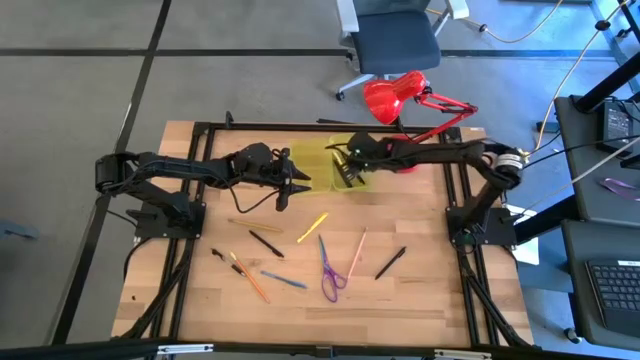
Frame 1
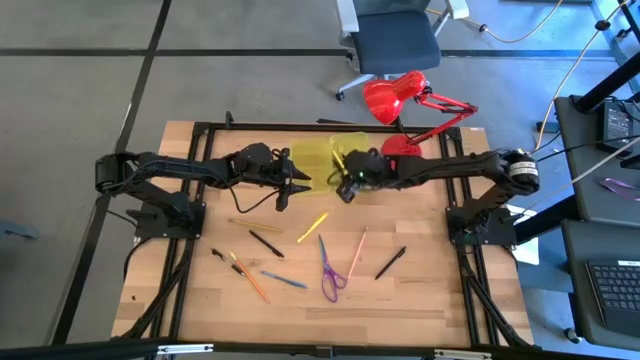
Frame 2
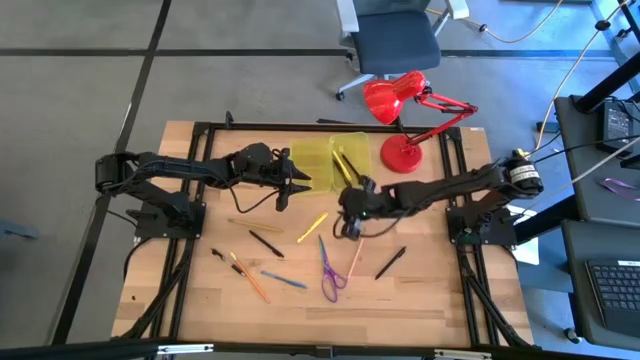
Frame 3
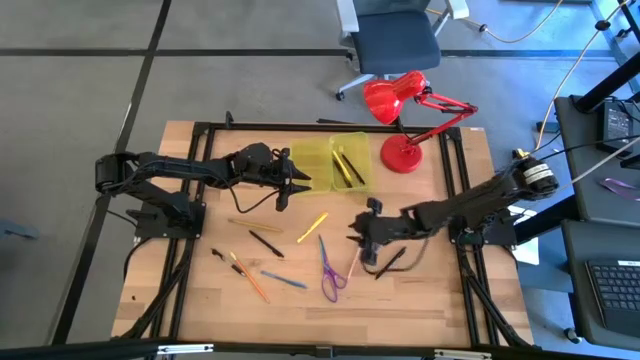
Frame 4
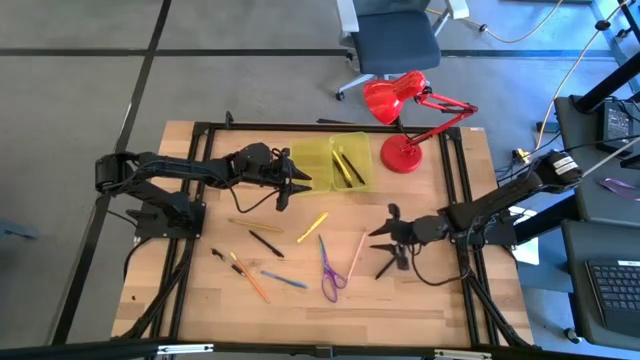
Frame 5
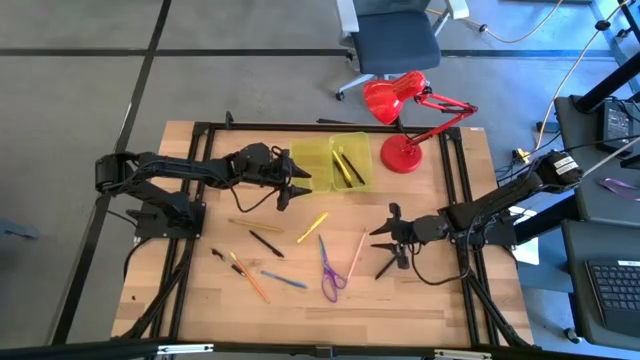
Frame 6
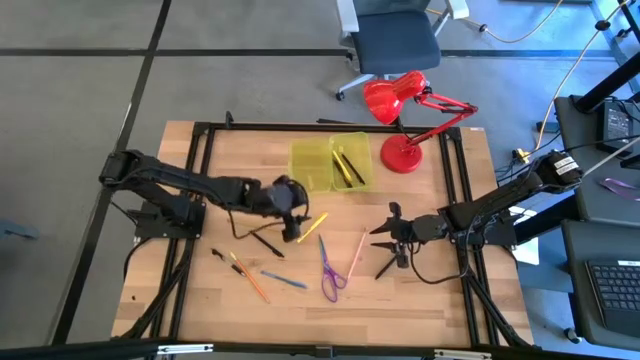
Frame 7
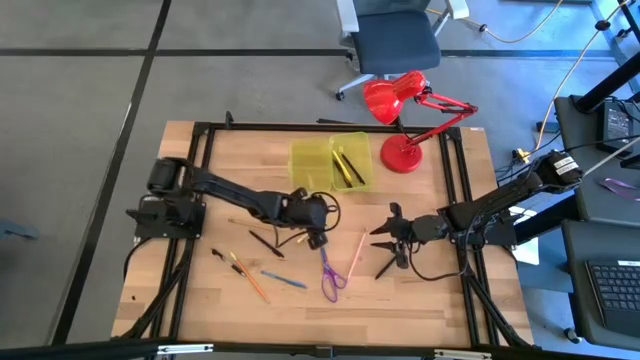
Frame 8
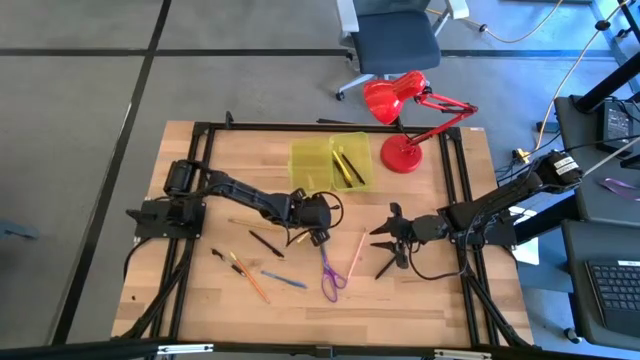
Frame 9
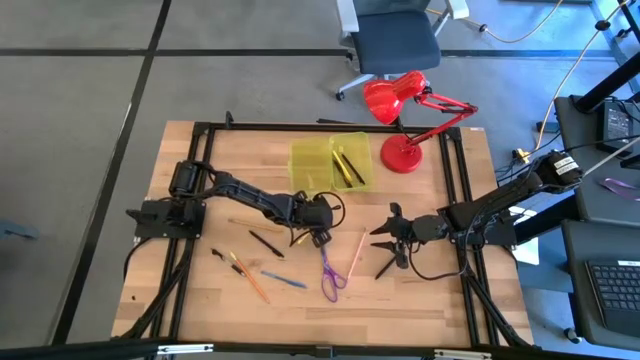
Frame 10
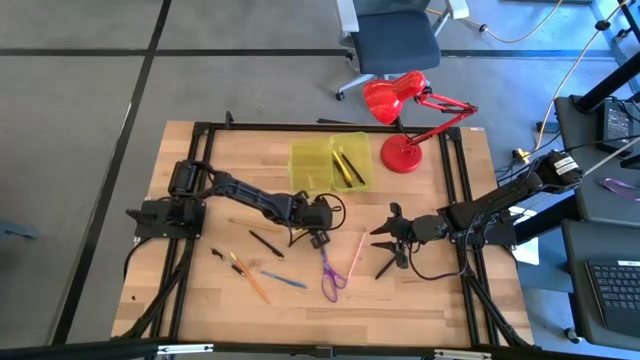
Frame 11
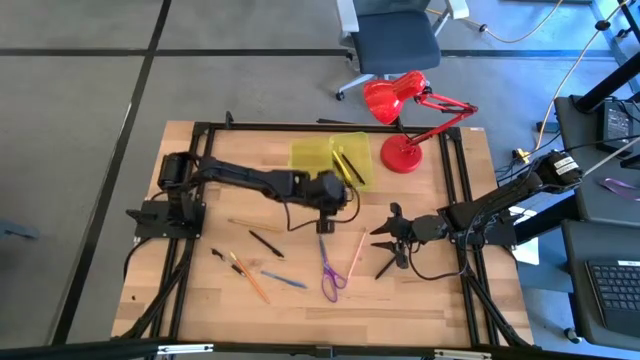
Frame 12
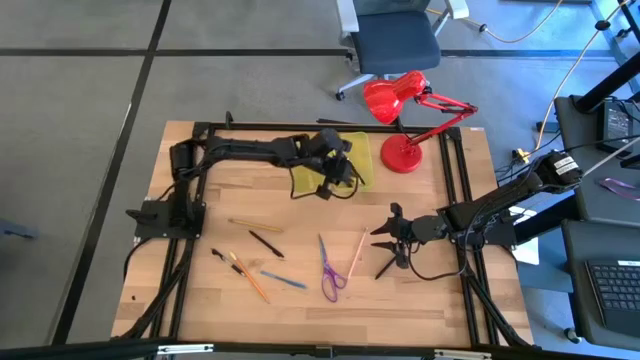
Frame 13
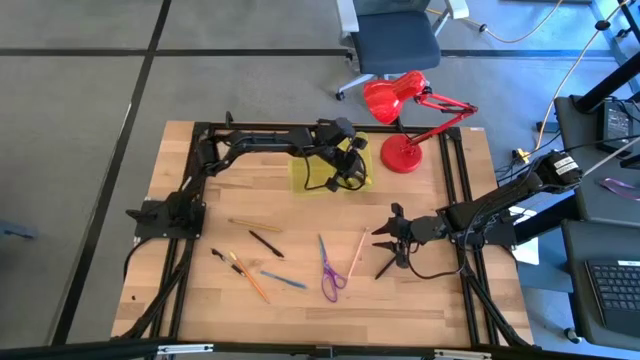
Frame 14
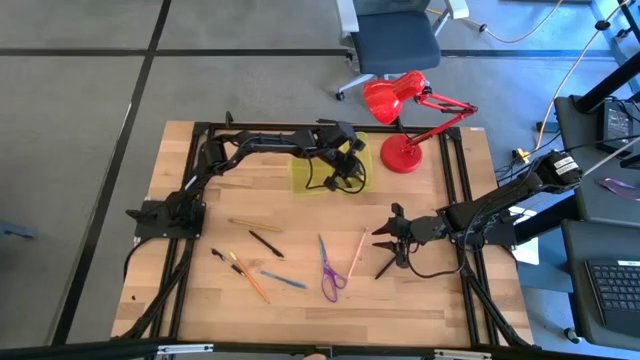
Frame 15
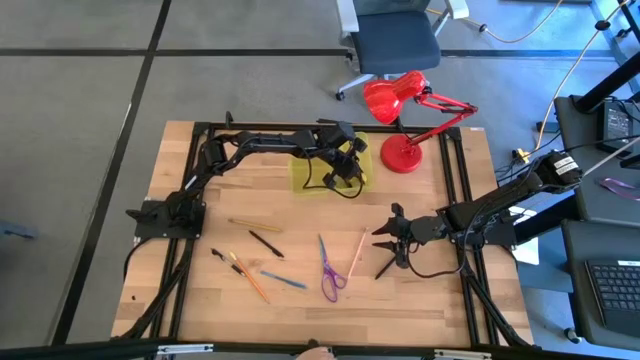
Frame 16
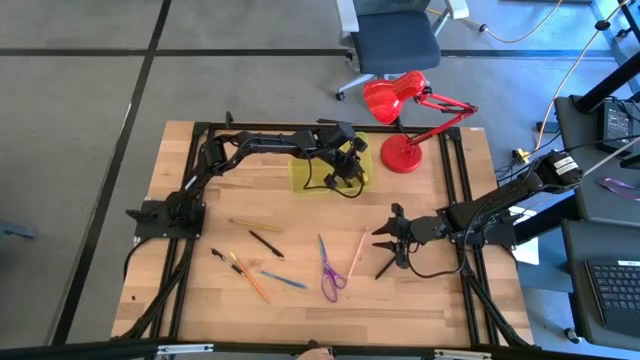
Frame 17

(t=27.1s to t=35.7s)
Task: Pick & place school supplies into a supply box
Put the yellow pen into the yellow supply box

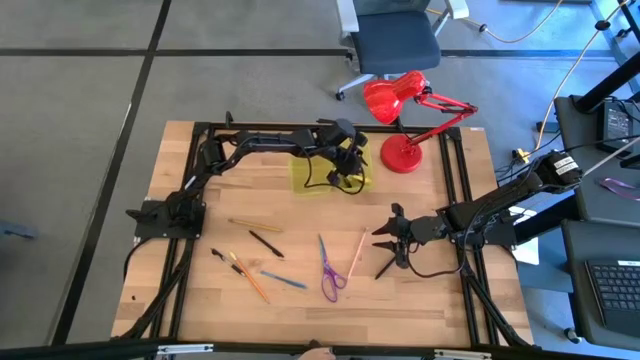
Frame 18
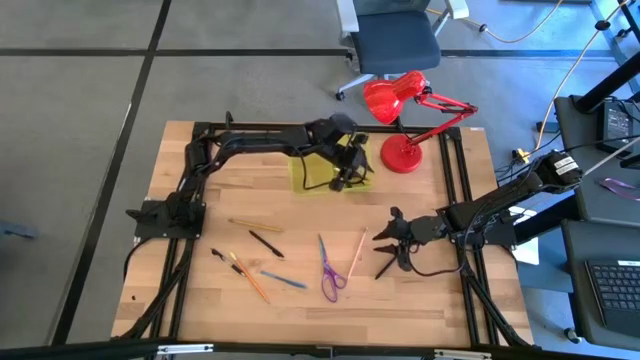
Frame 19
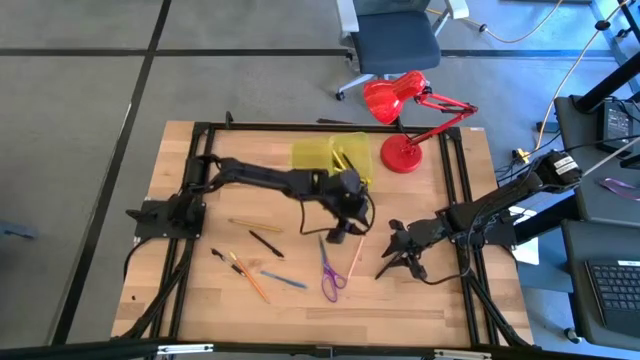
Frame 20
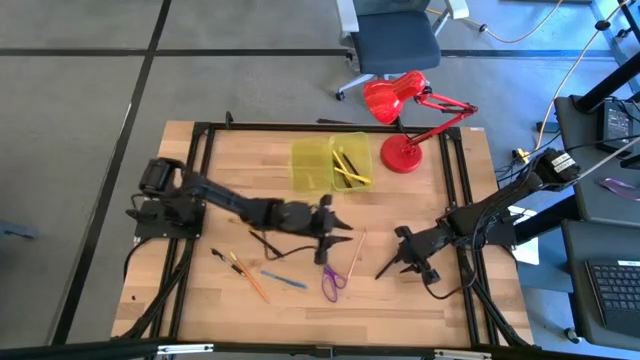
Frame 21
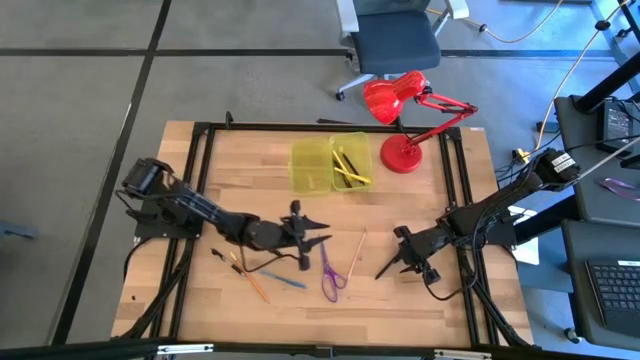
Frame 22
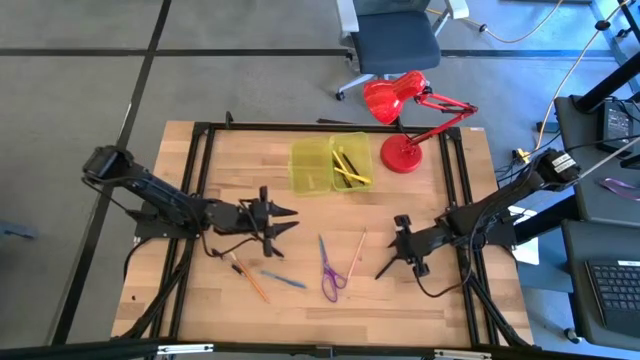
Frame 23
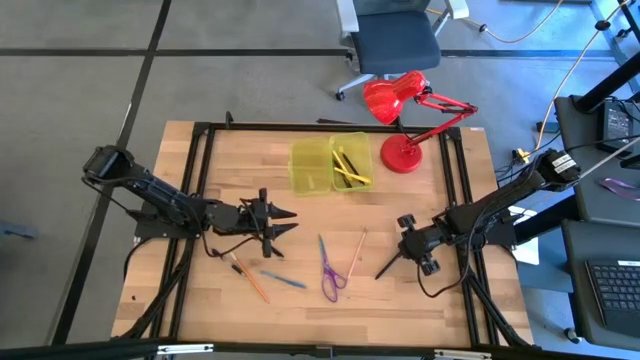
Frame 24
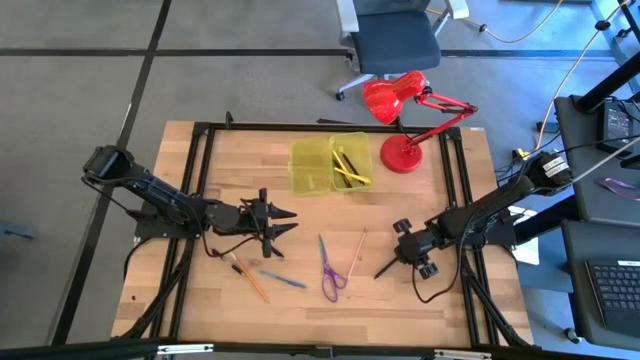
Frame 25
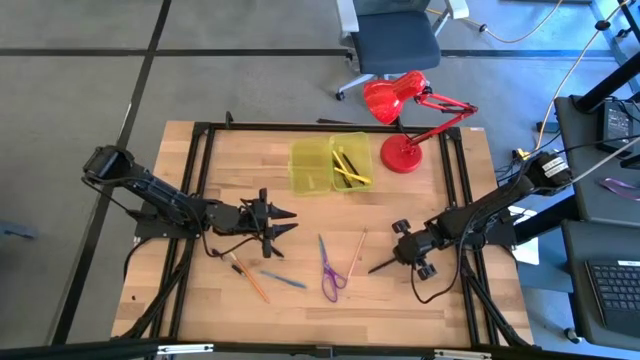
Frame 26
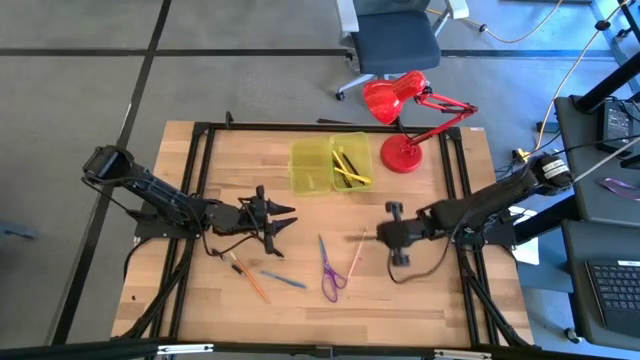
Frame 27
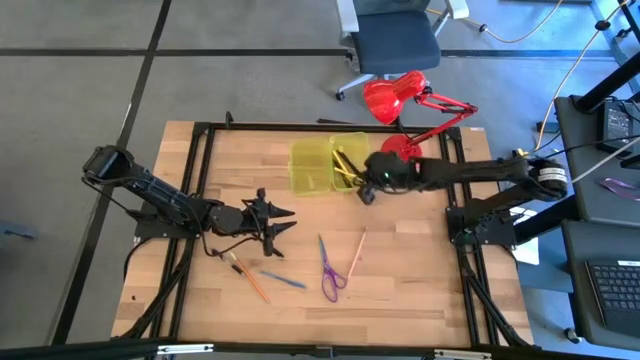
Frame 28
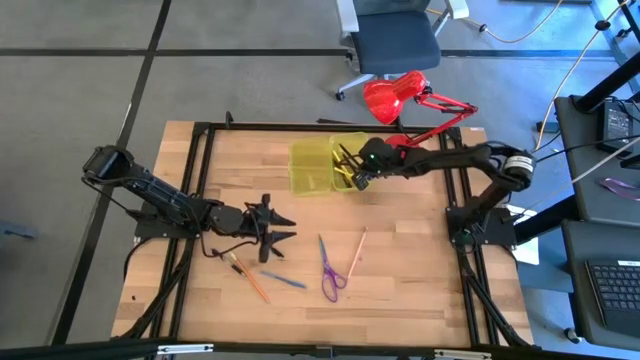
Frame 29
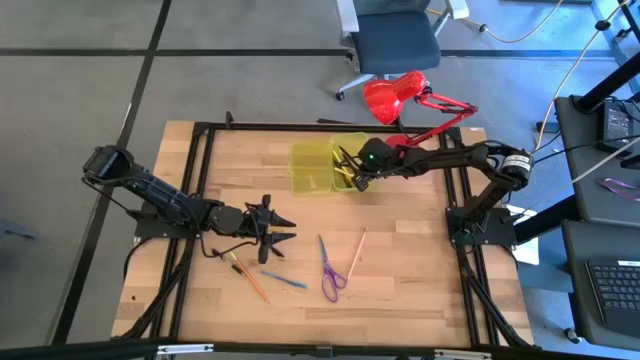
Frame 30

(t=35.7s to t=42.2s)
Put the black pen into the yellow supply box

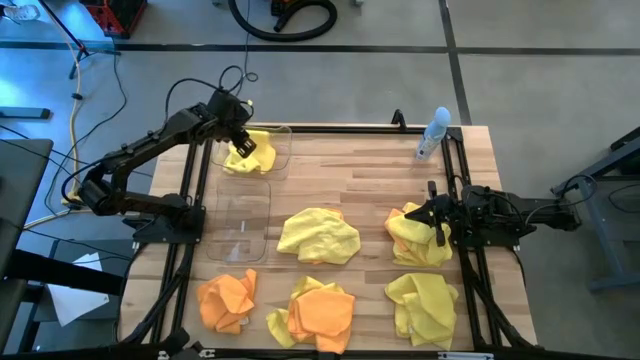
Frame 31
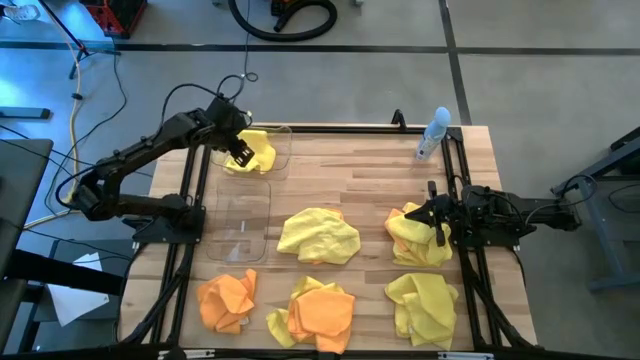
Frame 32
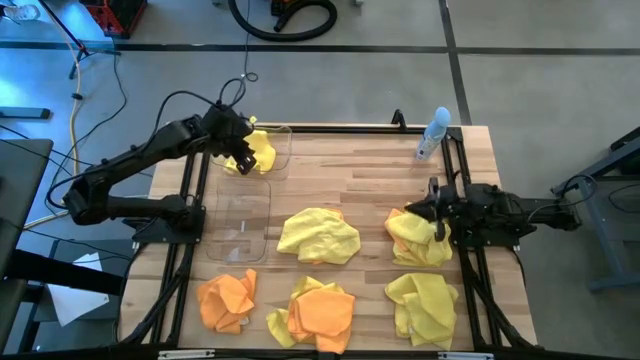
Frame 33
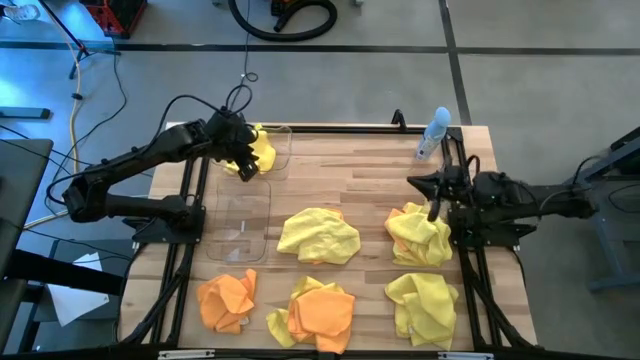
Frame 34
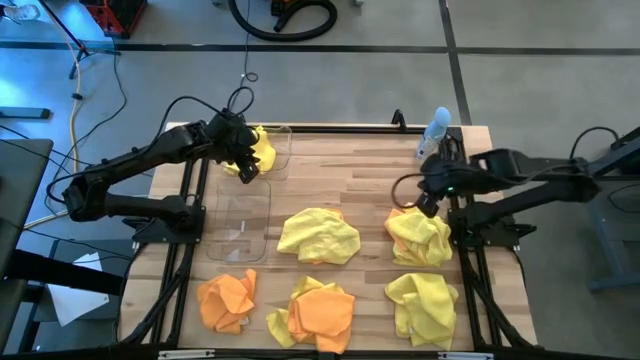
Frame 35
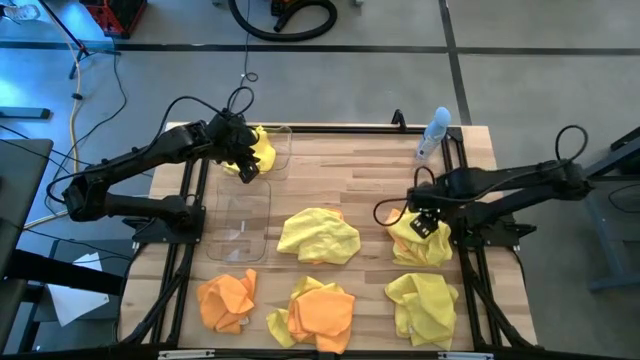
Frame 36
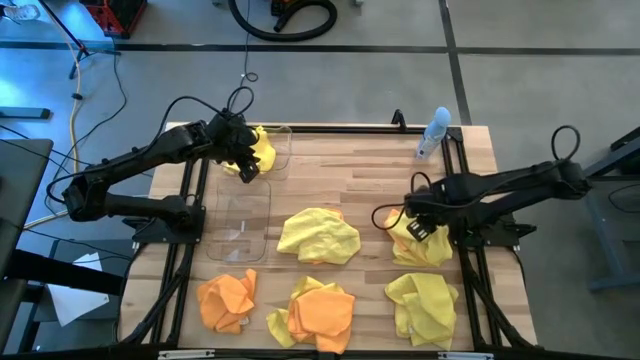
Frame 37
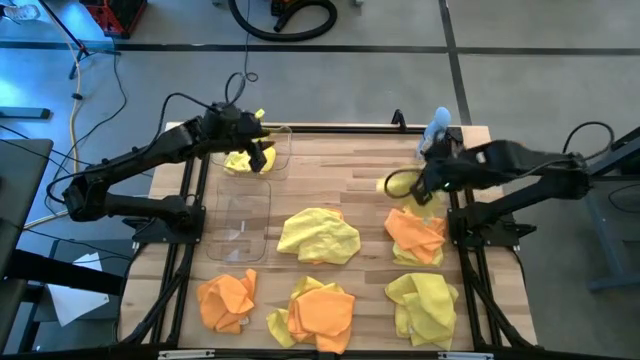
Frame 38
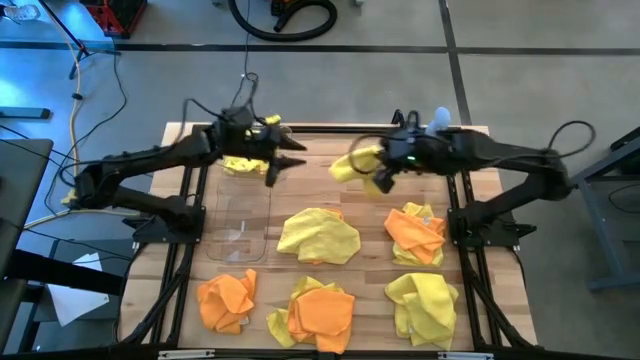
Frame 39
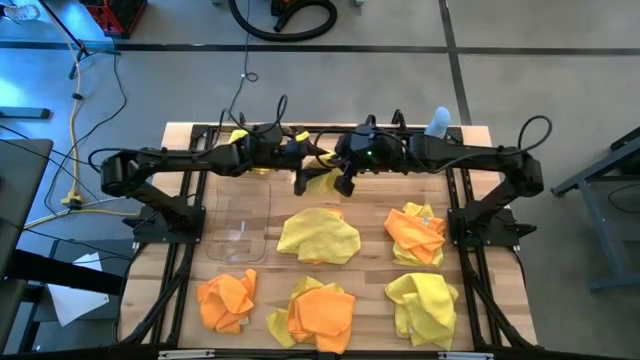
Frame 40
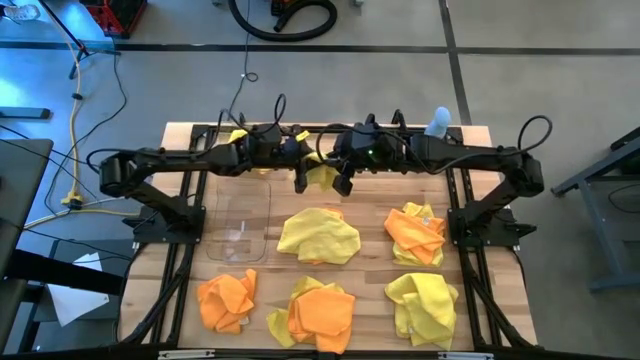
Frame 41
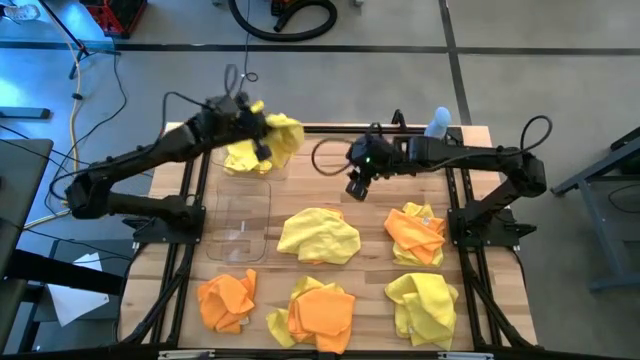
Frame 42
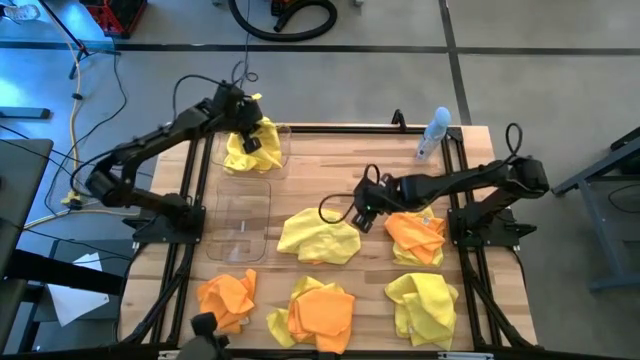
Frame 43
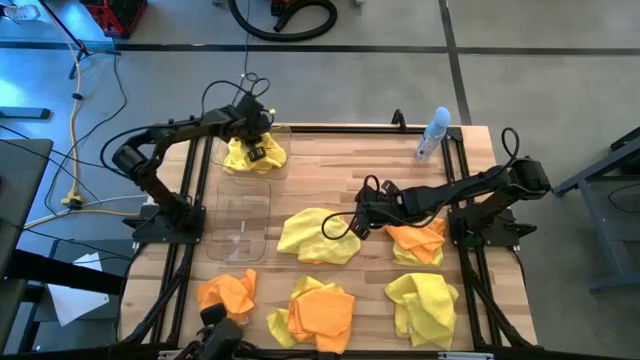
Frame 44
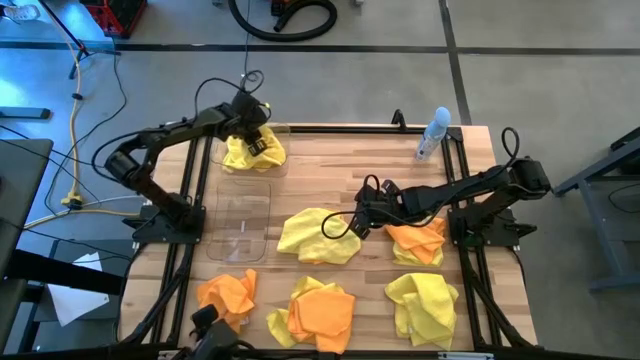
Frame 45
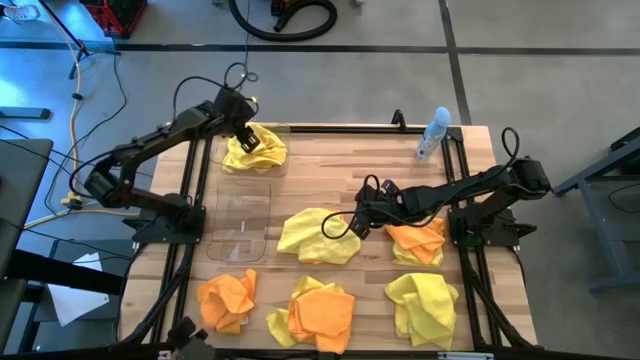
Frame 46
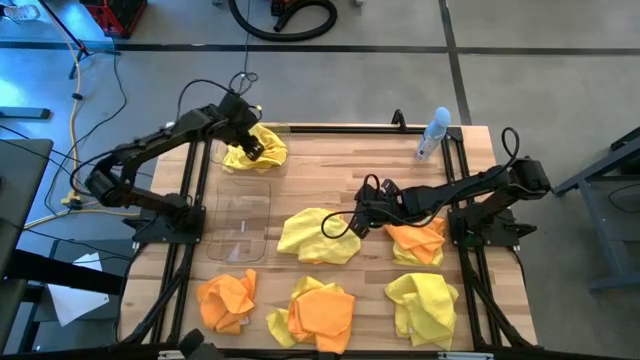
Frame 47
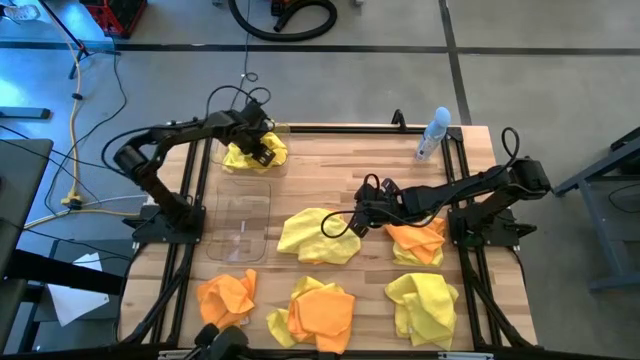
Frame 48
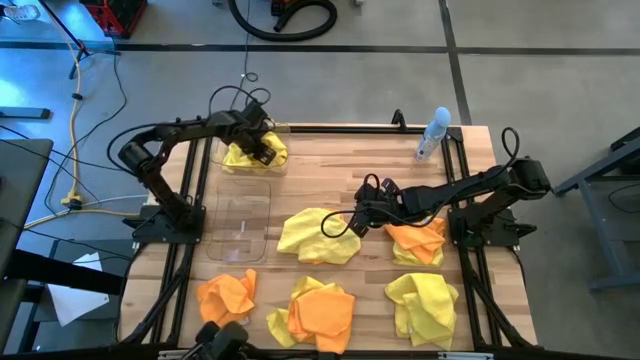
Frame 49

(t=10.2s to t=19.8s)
Task: Sort microfiber towel by color & place in baskets
Put the yellow microfiber towel into the top transparent bin
